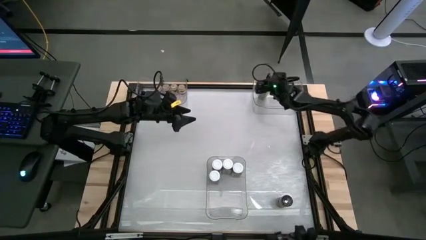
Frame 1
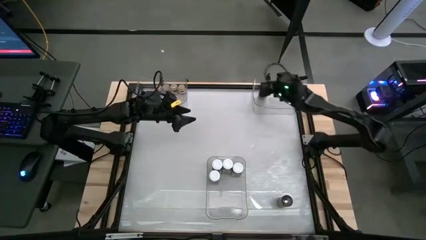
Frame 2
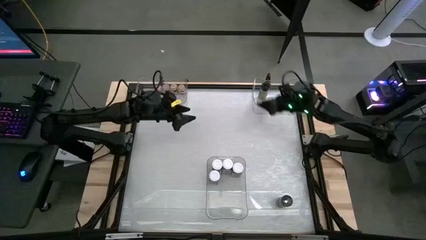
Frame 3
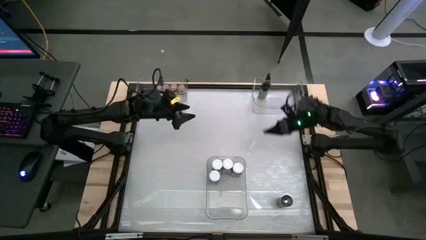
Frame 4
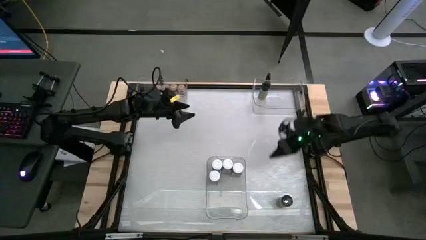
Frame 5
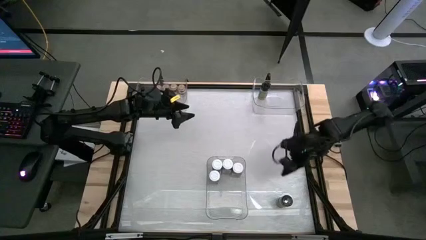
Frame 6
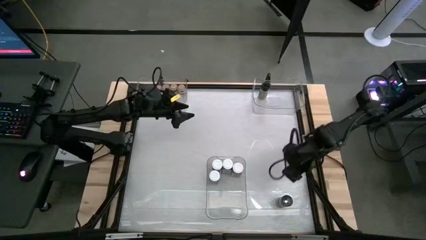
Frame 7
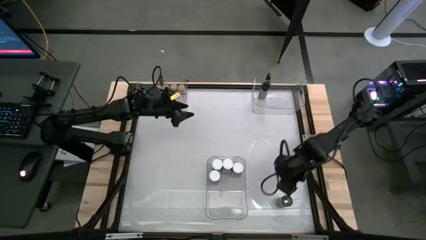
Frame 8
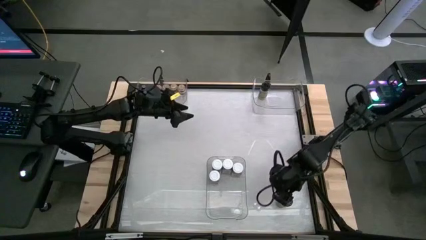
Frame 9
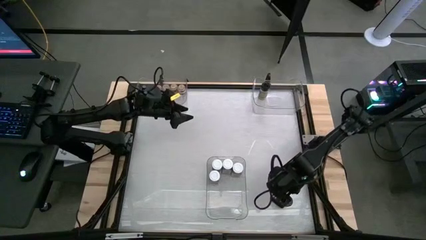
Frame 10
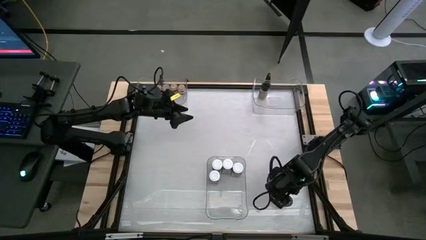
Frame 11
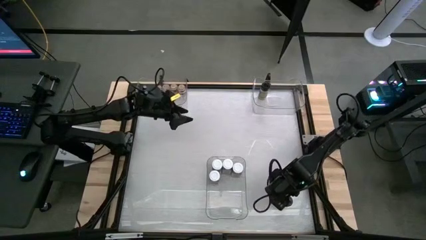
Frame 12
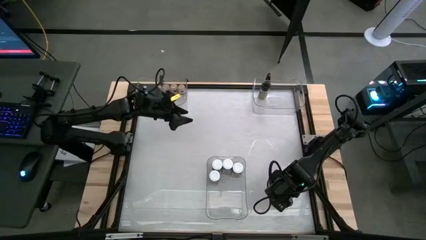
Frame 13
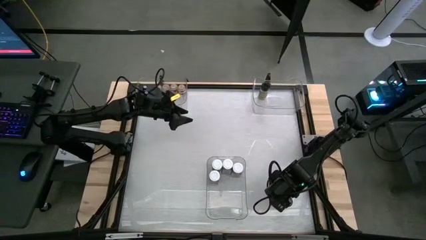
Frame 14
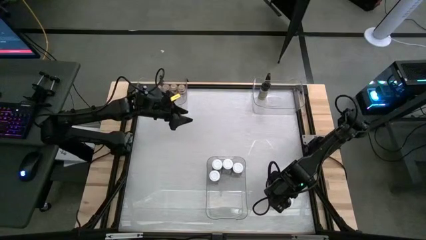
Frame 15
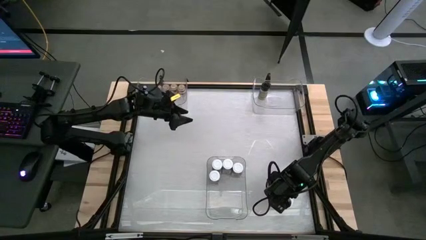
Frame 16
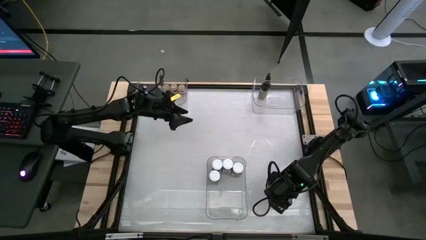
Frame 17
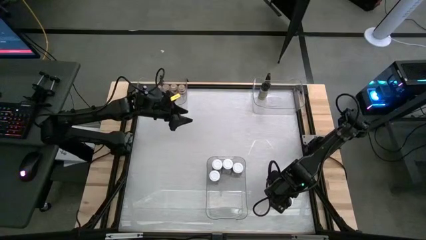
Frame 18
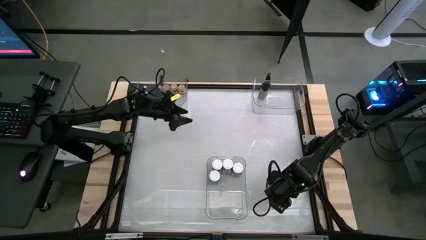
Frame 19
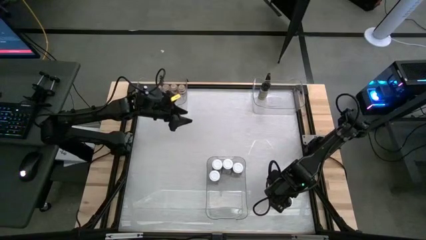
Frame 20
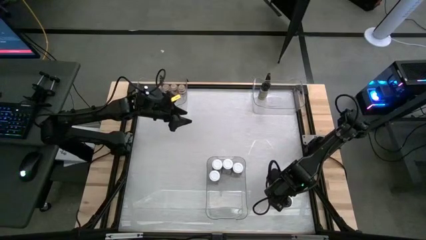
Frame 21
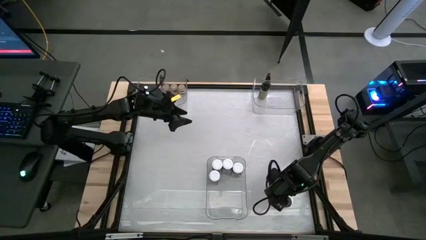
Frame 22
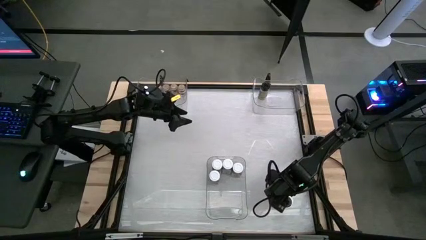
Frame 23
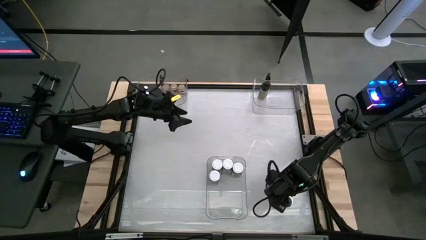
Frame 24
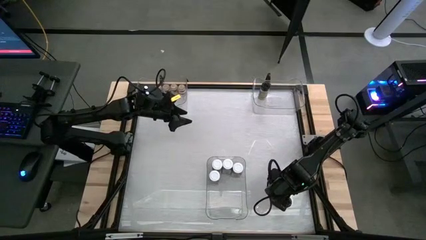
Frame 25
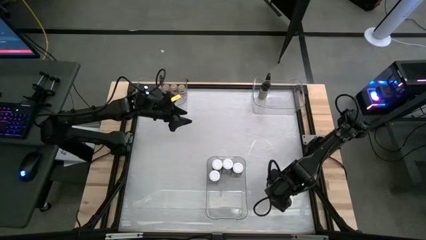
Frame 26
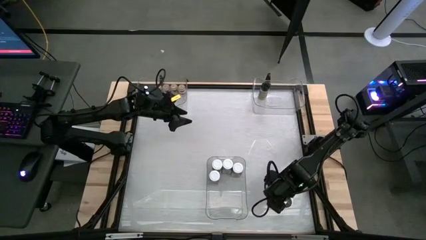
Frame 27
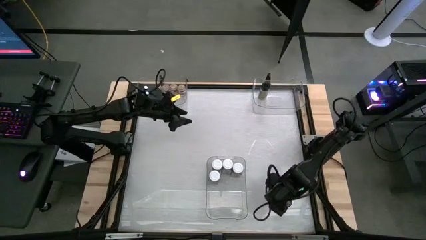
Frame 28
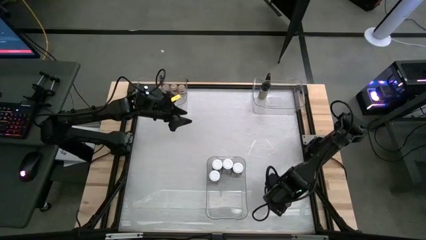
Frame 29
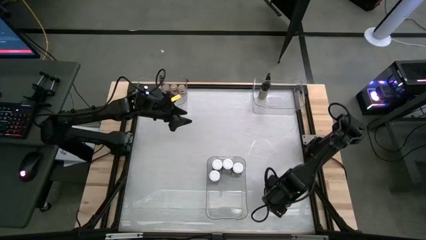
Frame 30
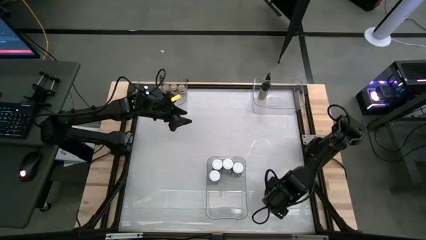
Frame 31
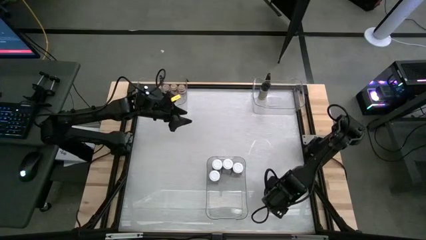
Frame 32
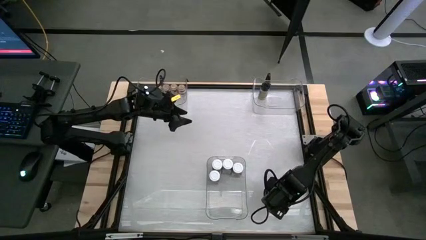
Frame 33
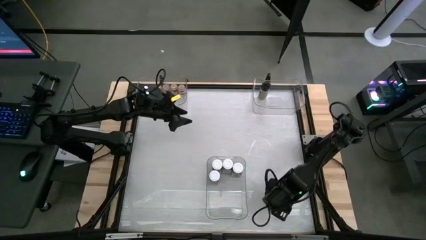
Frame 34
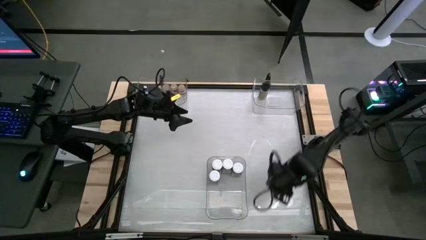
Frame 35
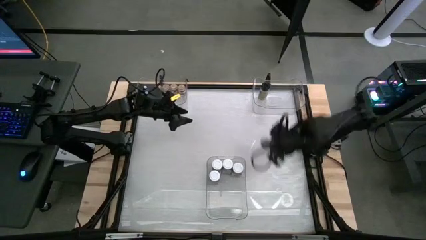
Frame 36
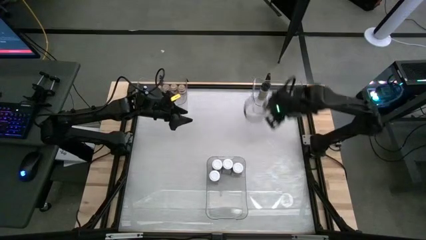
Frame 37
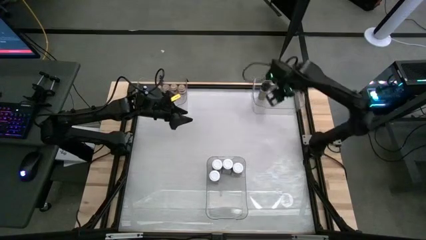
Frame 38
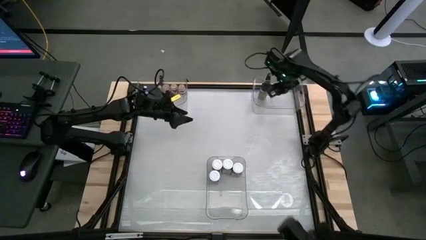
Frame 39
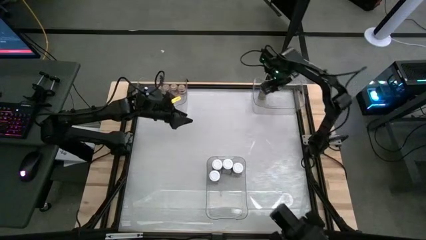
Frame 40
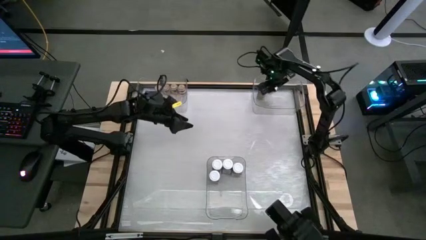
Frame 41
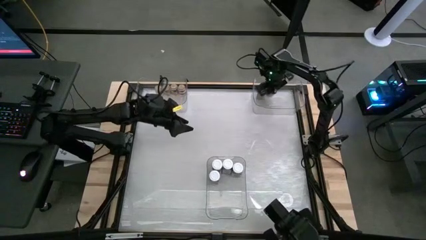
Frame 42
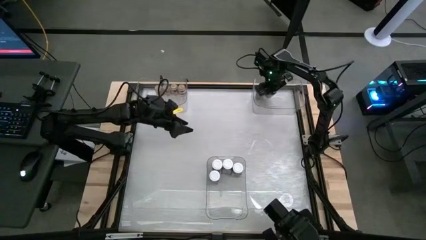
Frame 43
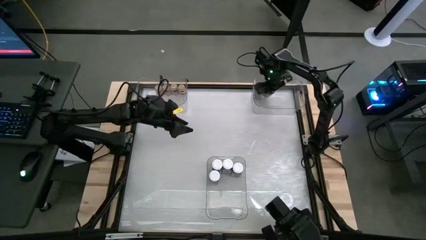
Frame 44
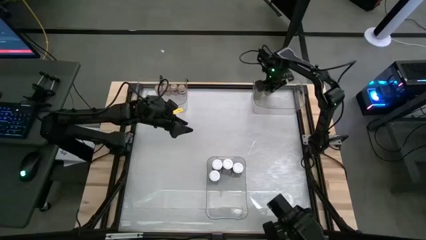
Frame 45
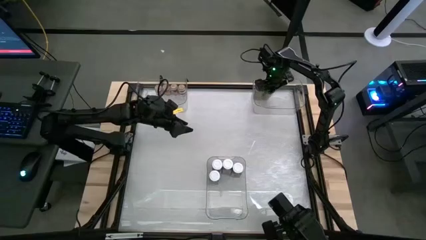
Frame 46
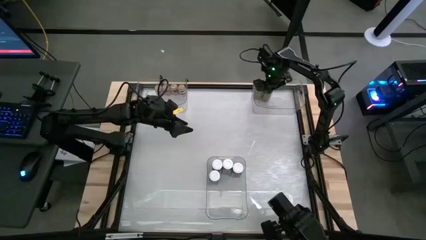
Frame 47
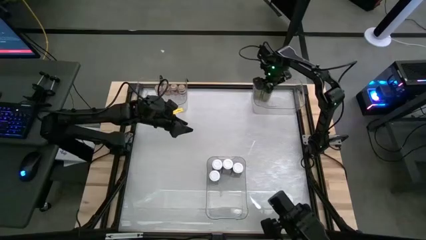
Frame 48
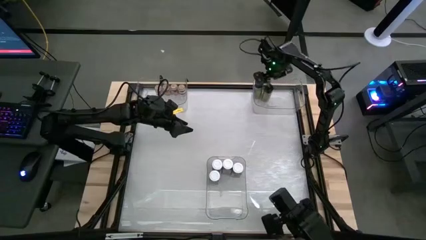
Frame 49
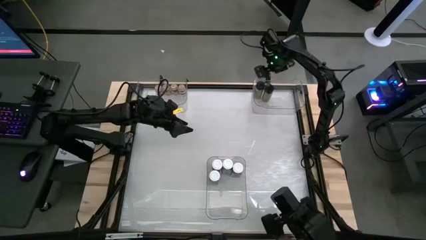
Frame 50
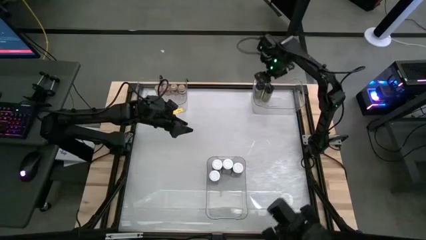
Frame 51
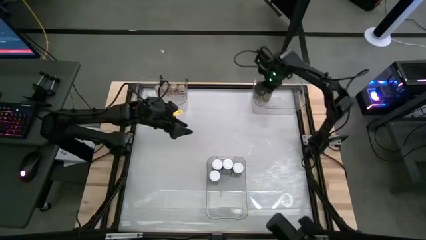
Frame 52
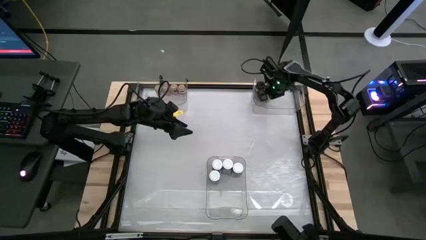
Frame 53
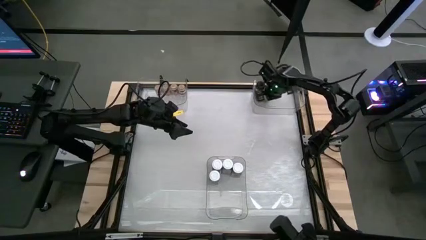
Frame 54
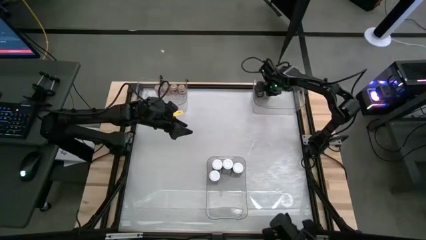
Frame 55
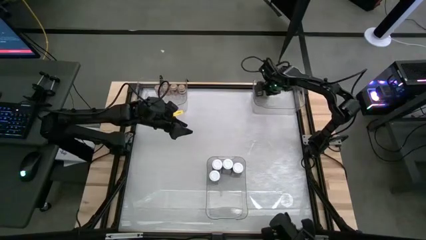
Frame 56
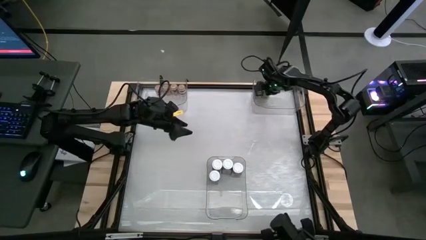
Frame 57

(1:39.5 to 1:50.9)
Task: Sort spices by type
Put the black seasoning bottle into the top right transparent bin

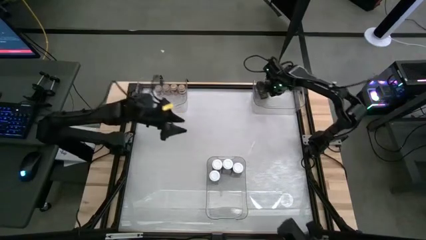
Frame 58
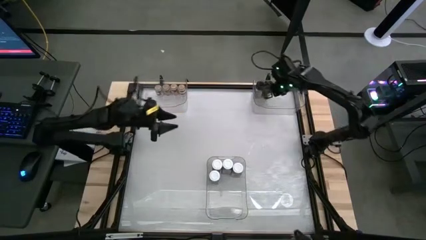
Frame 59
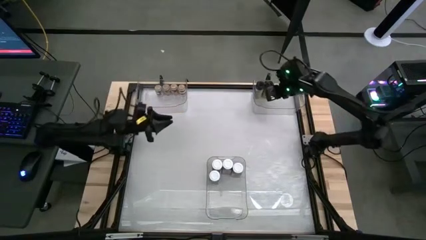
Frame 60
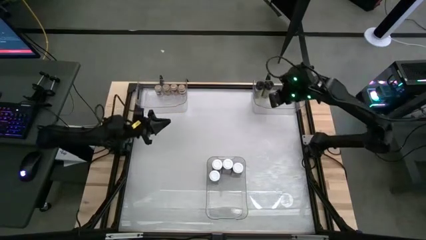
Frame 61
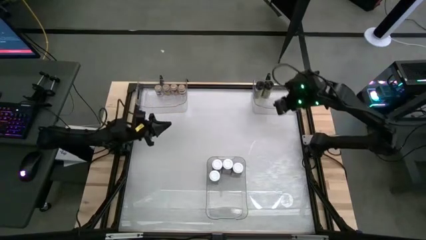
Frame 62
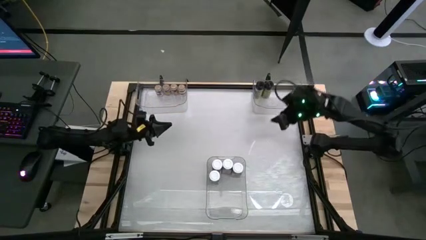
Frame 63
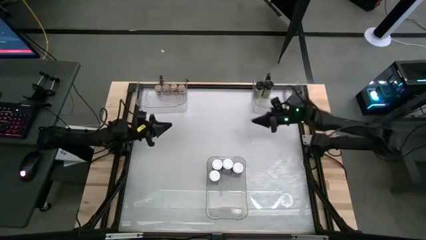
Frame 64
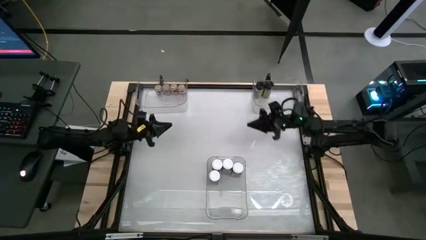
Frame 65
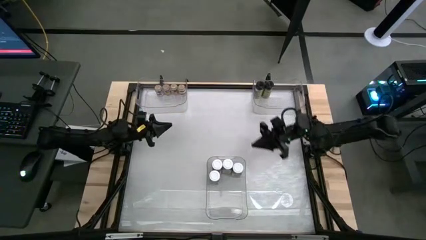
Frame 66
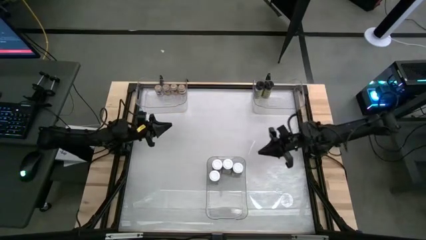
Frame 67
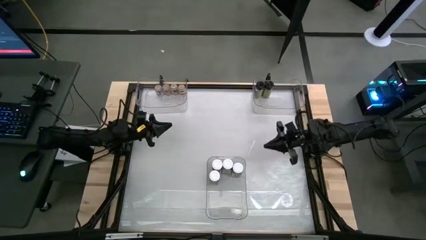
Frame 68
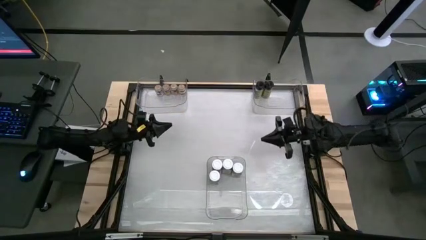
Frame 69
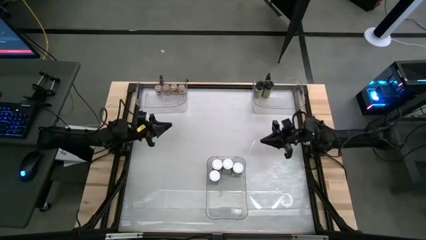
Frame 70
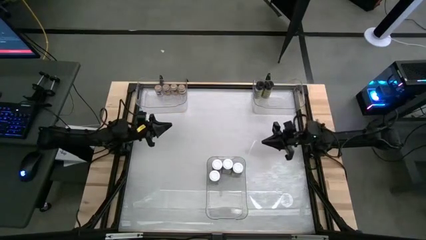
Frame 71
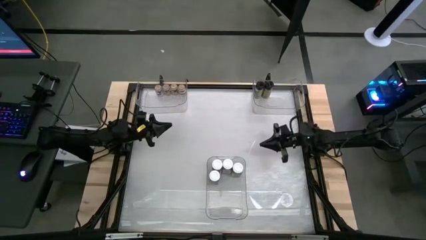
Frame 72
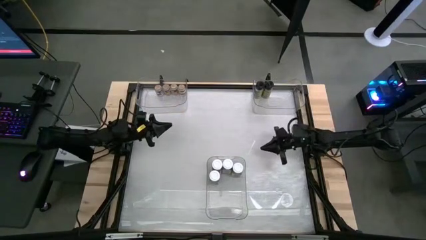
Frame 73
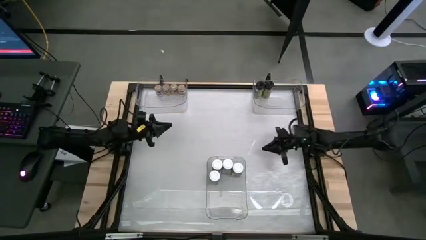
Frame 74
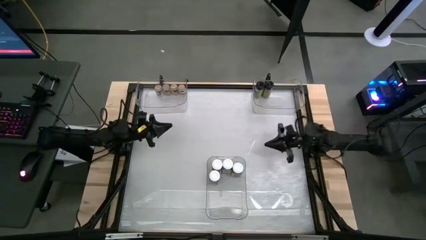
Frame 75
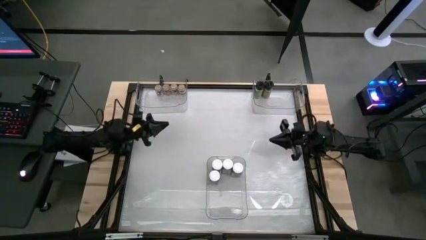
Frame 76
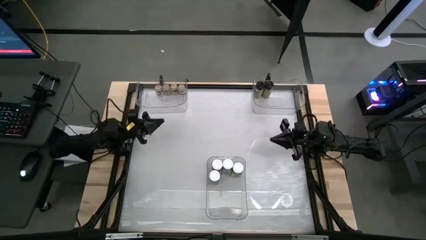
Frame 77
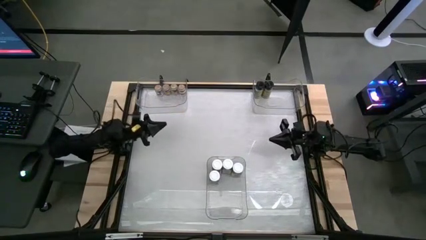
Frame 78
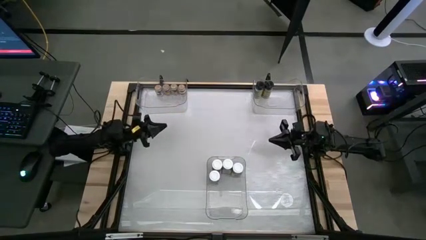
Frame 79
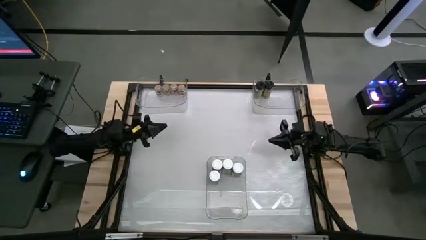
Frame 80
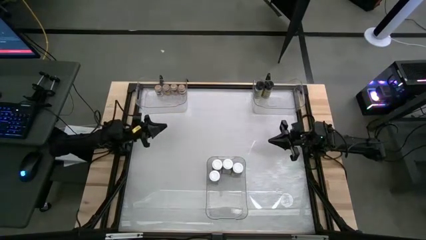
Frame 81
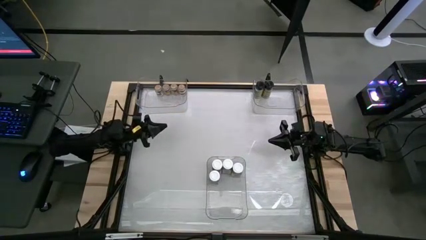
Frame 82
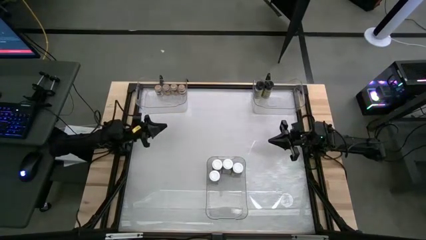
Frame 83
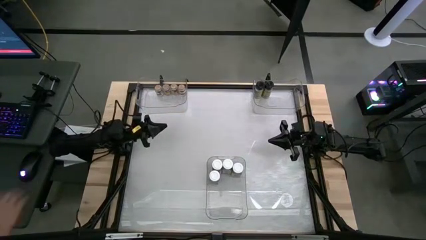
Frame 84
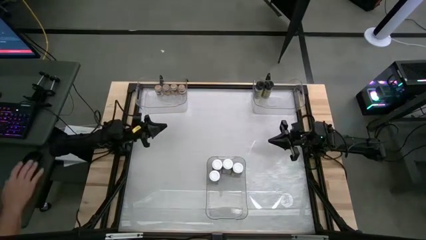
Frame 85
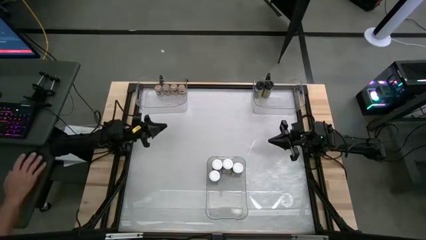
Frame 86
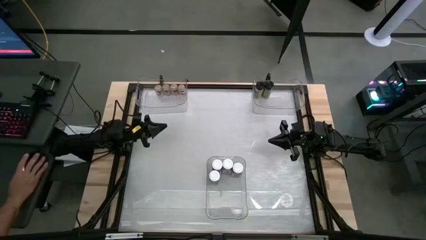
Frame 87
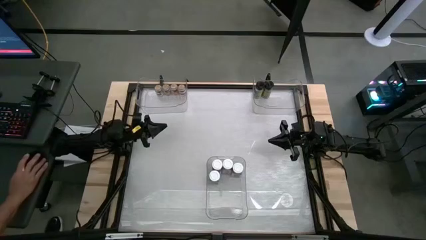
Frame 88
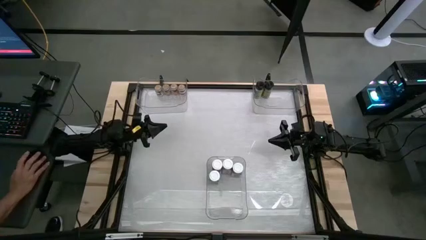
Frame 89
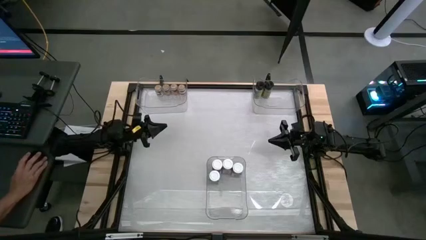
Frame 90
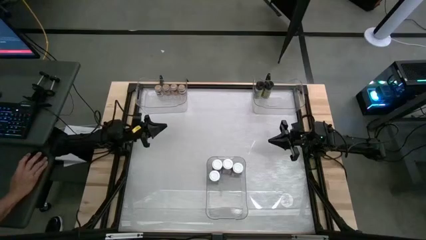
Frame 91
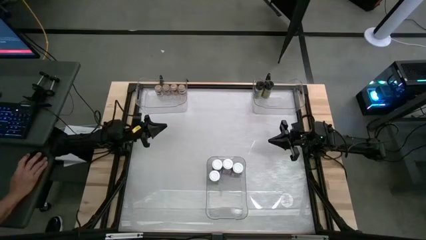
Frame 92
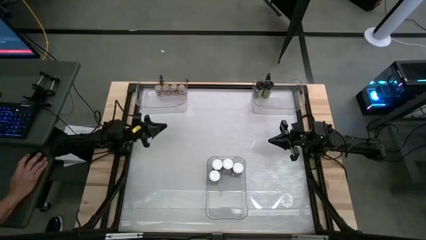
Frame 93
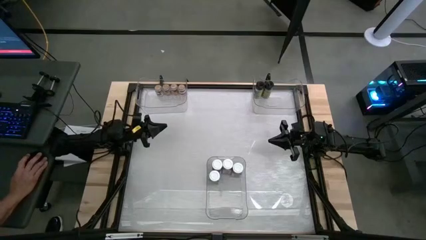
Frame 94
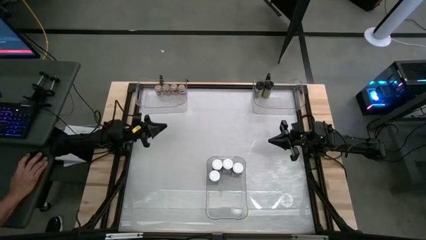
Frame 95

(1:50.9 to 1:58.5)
Return to Home Position
